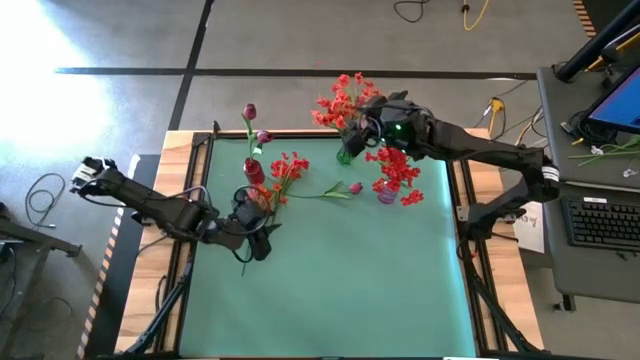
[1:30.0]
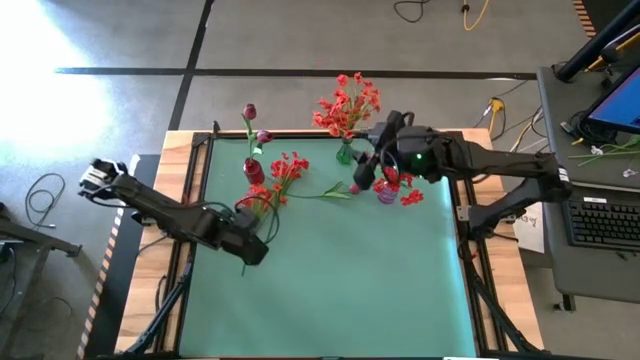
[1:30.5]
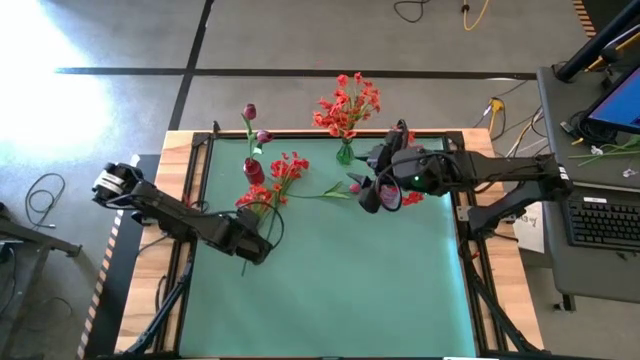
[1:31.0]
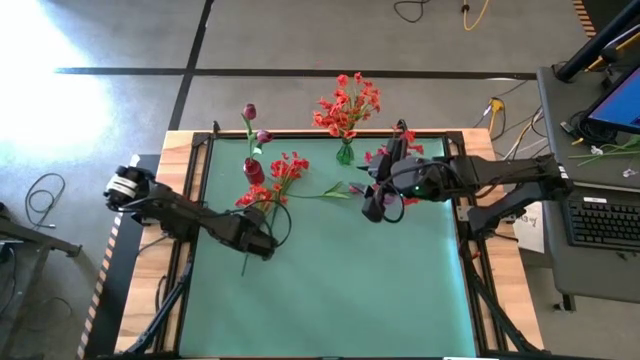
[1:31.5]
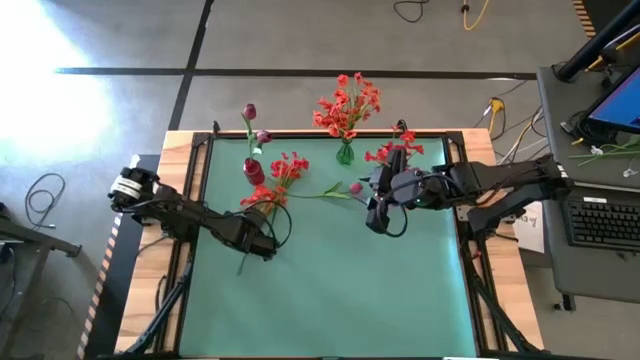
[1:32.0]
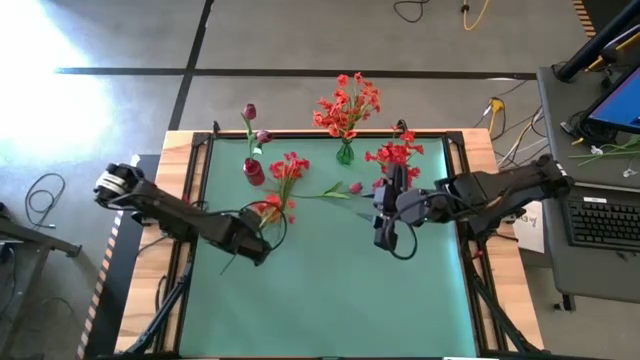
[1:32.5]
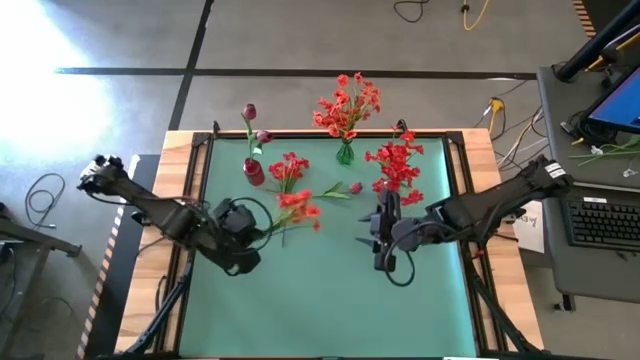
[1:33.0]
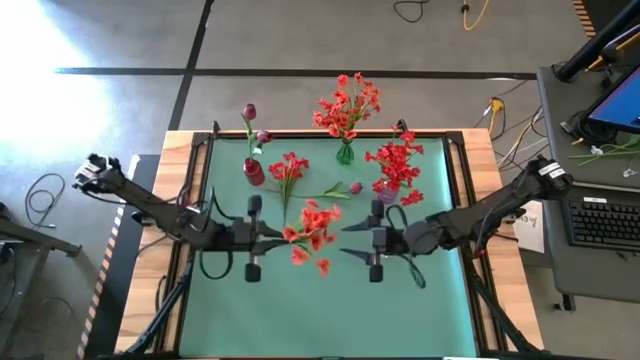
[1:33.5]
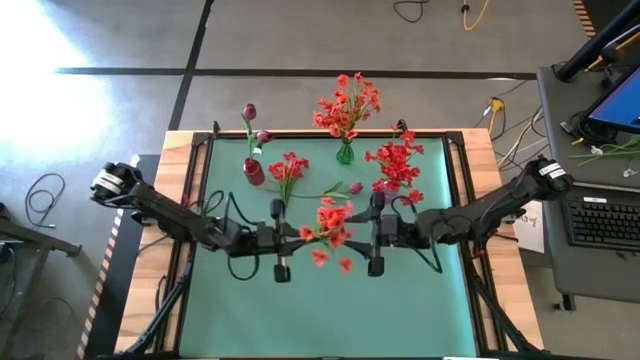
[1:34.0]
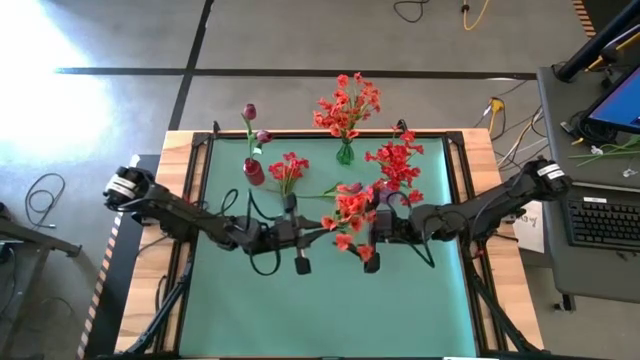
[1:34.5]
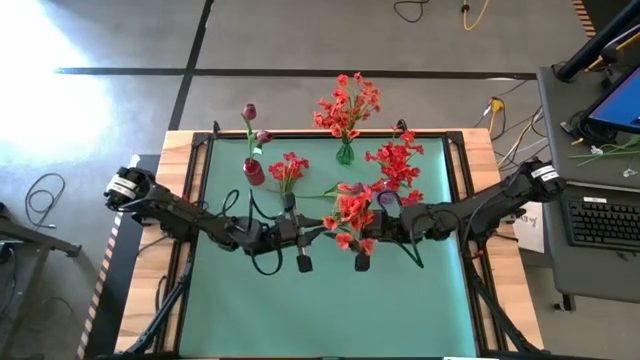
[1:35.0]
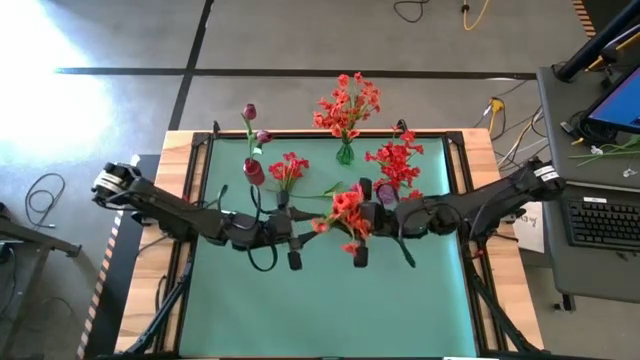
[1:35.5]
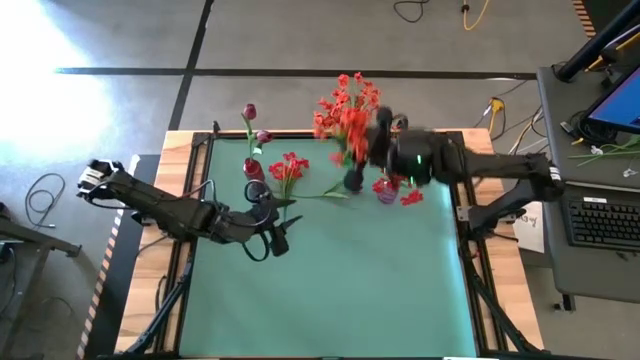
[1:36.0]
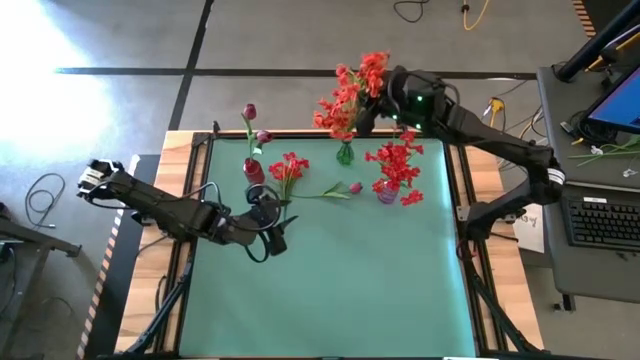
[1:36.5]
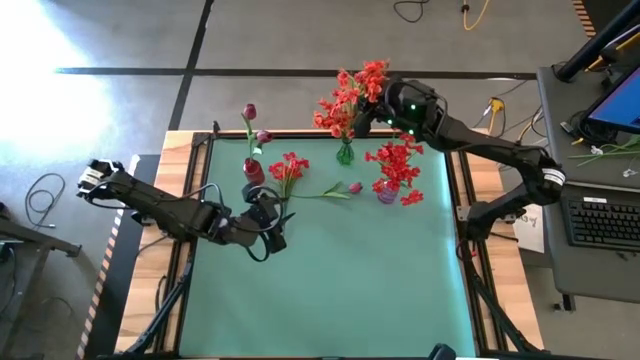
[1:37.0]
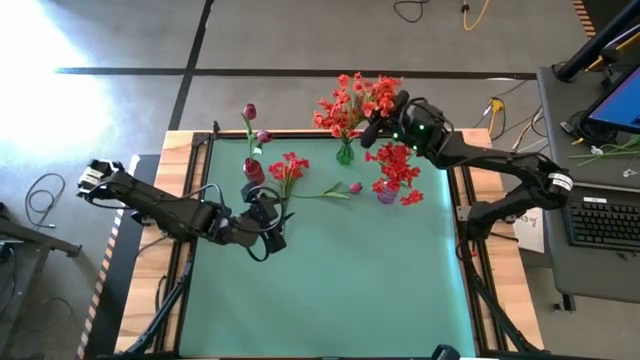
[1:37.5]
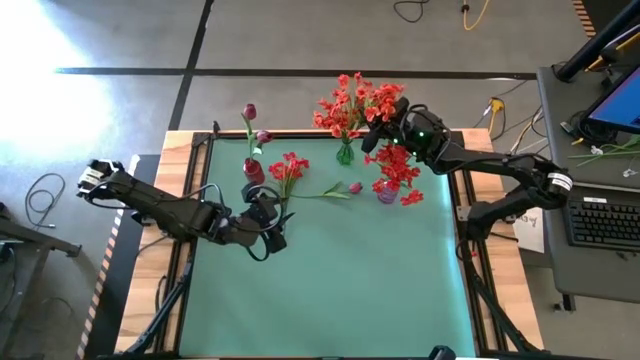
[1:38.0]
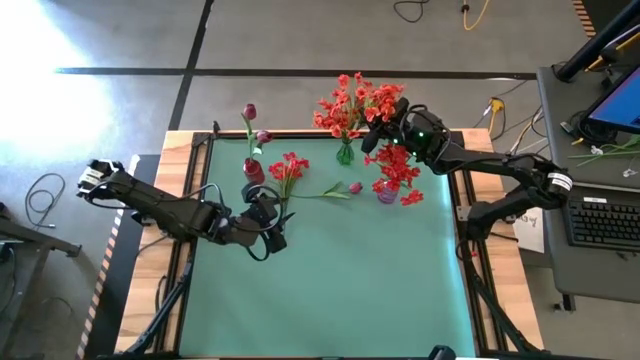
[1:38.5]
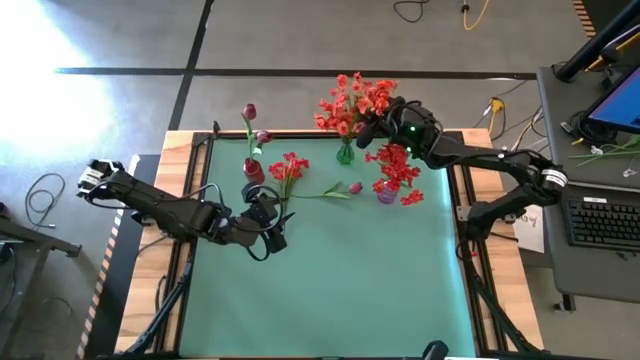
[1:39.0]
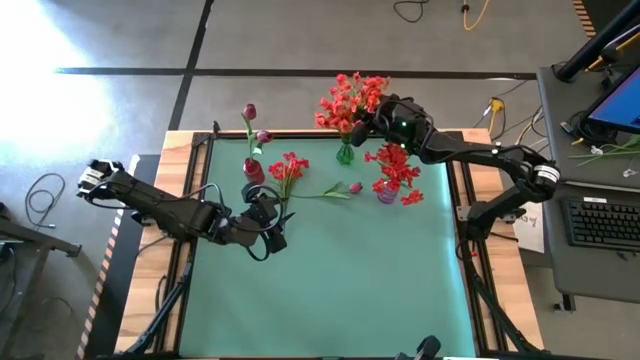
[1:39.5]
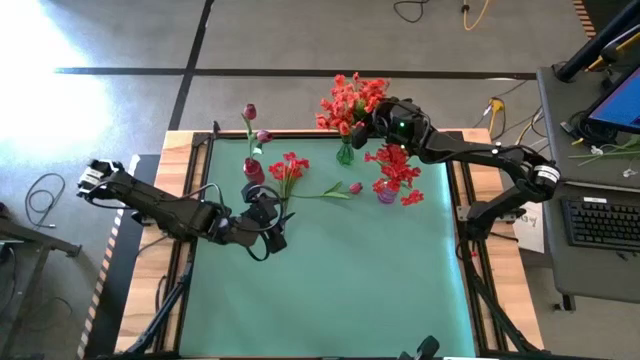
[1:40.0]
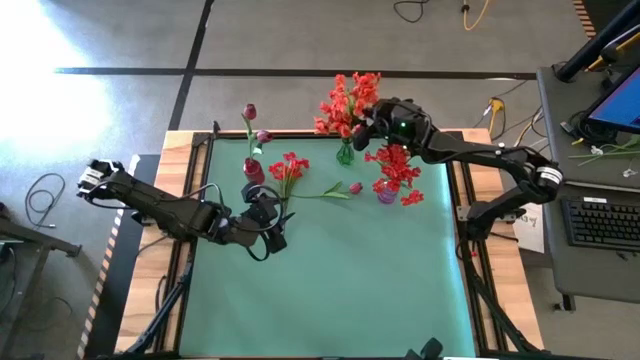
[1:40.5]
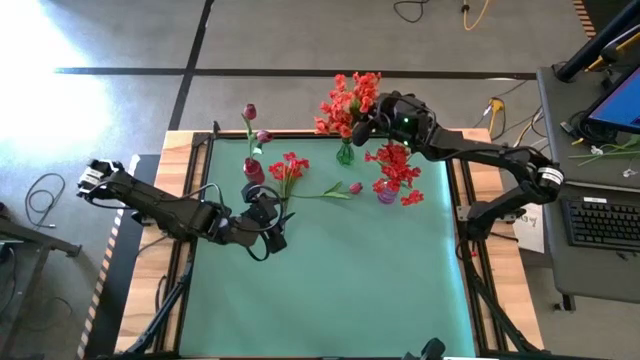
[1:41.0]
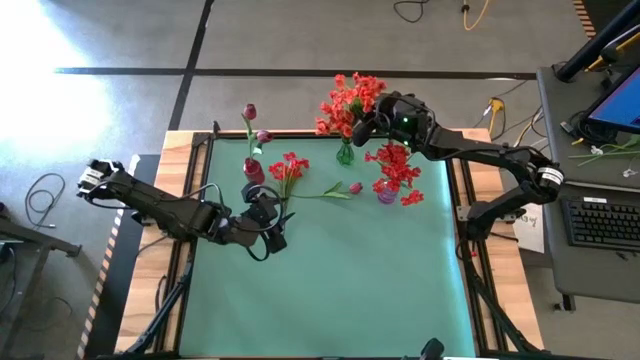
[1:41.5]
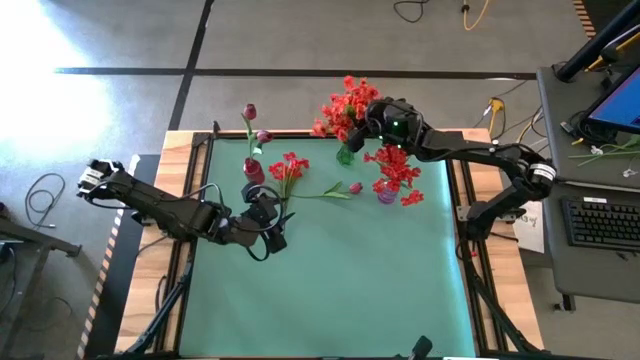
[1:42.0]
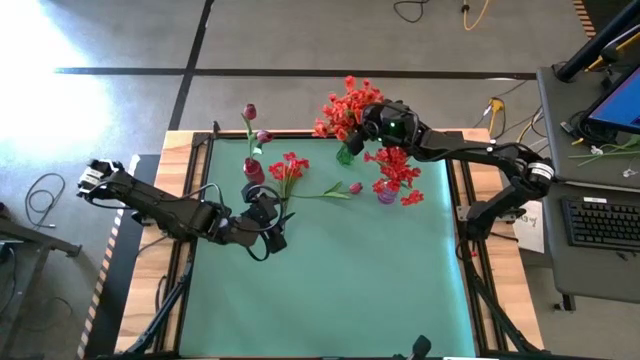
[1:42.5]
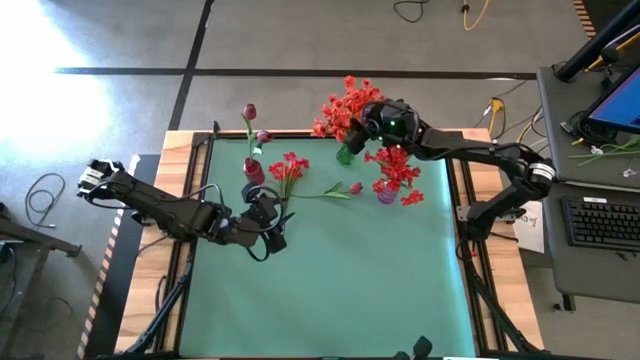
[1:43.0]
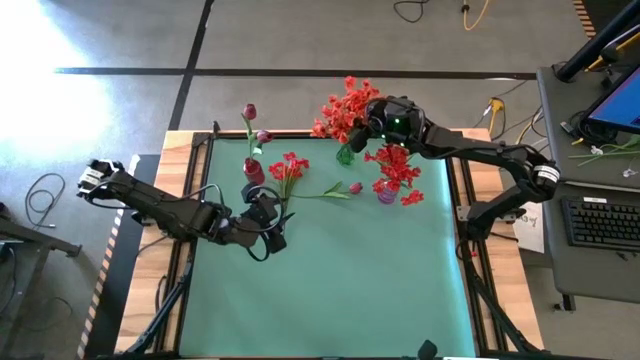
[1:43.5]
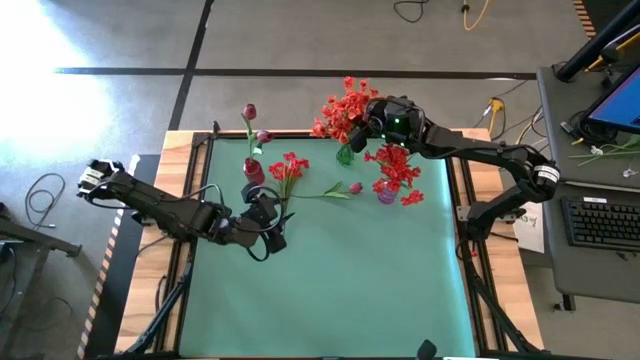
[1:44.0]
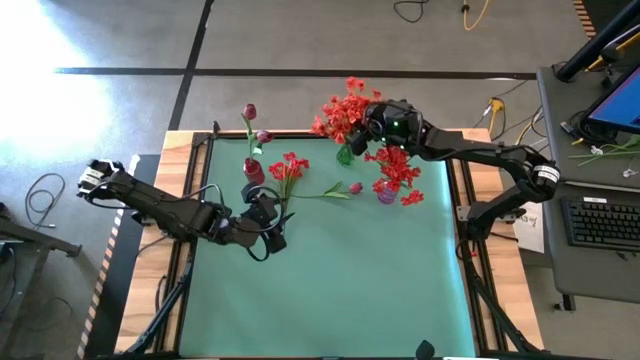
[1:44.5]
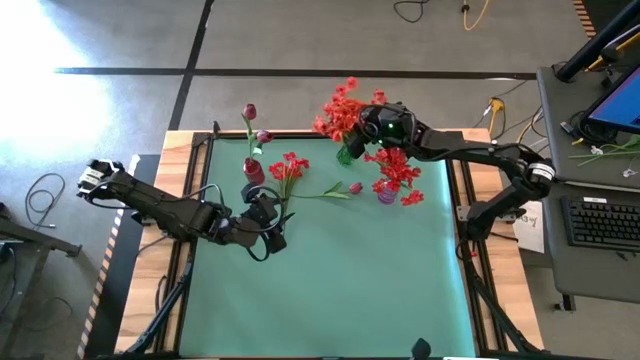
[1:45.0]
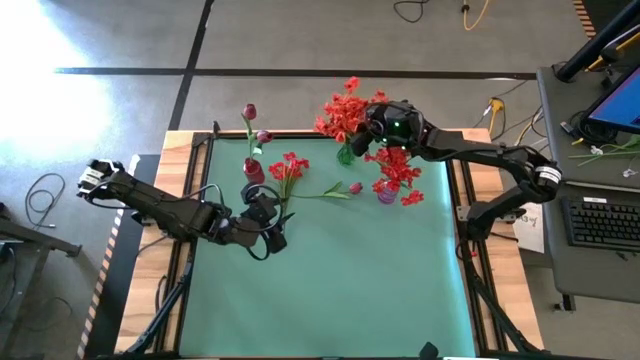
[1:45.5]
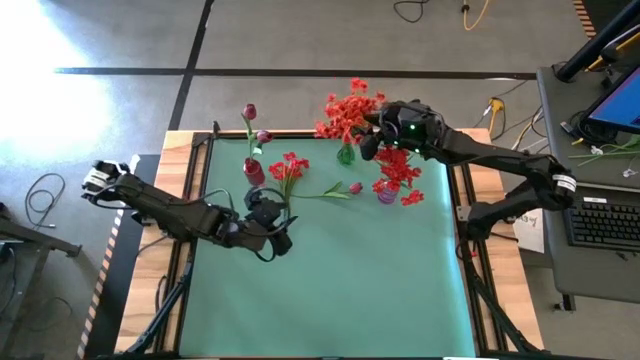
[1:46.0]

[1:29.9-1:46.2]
Task: Sort flowers into vase by color
Put the orange flowers into the green flower vase

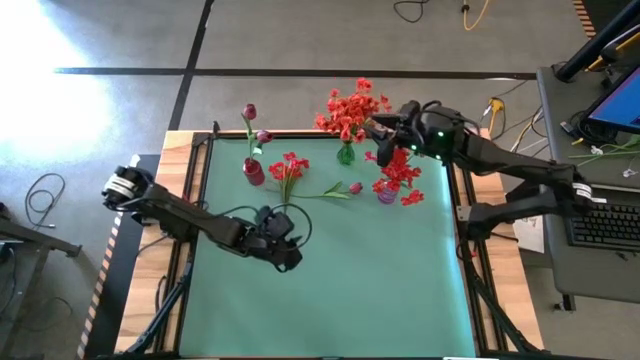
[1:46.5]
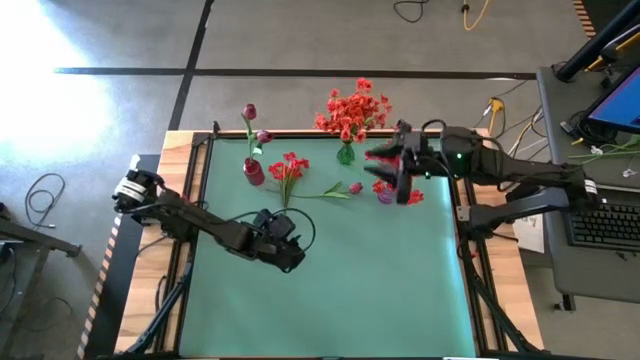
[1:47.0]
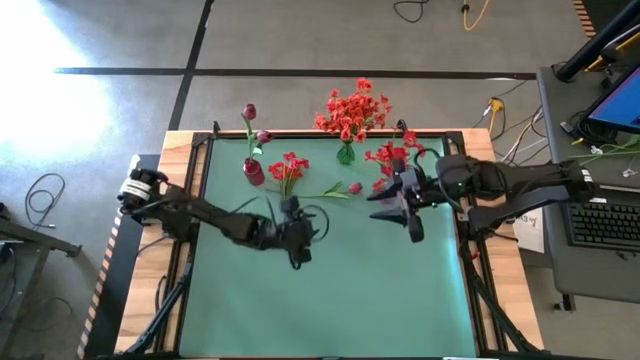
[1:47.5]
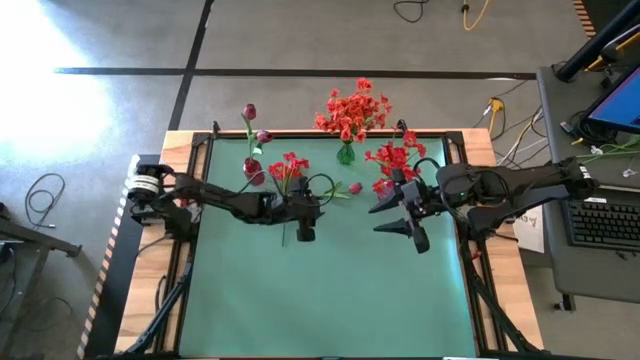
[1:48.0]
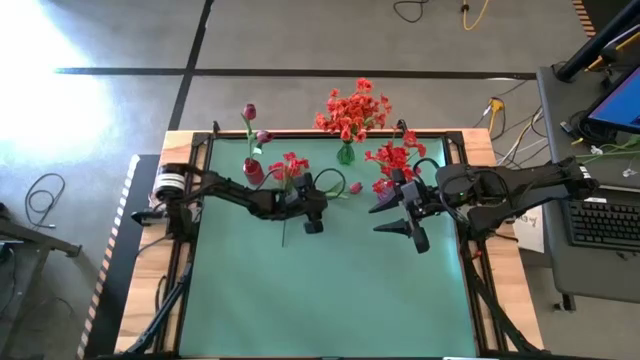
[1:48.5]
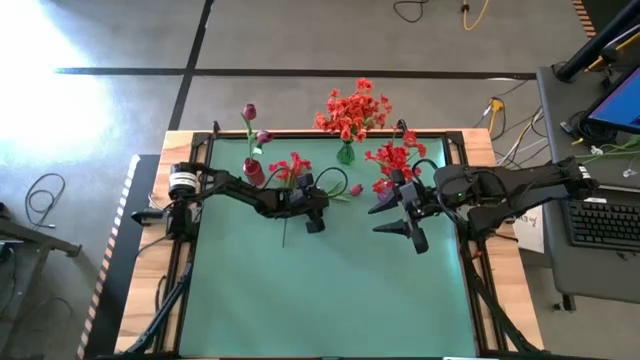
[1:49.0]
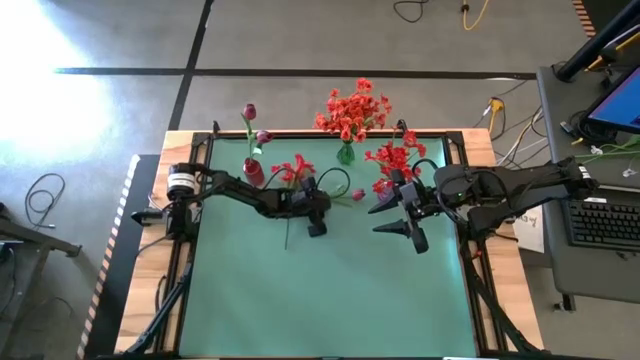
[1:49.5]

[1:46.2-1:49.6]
Put the dark red flower into the red flower vase
